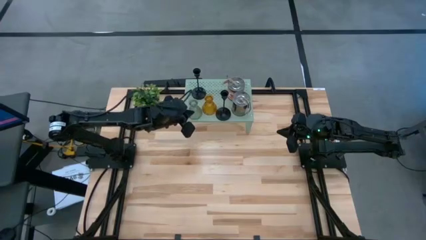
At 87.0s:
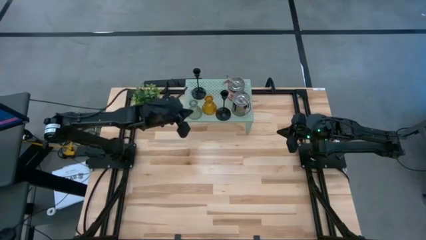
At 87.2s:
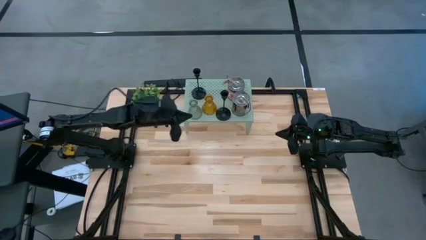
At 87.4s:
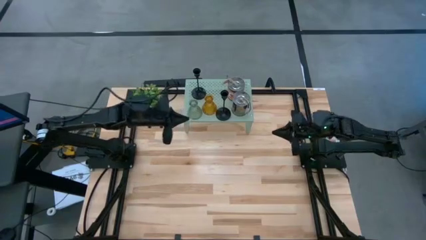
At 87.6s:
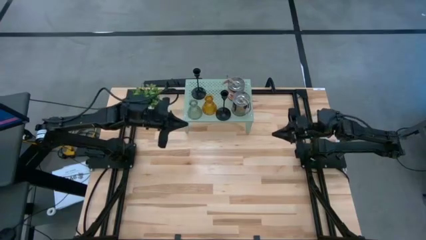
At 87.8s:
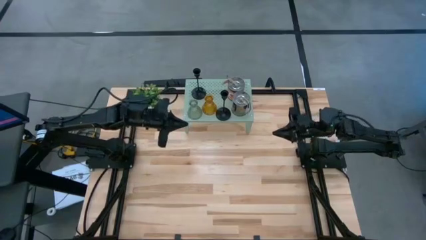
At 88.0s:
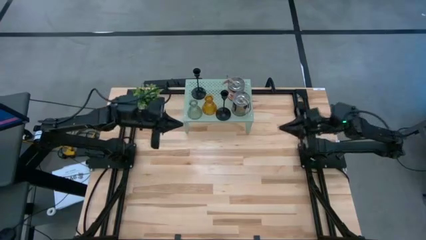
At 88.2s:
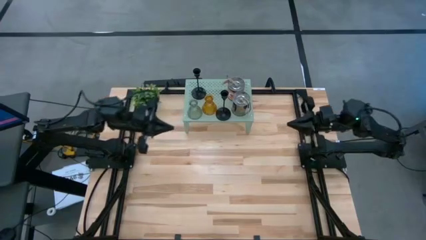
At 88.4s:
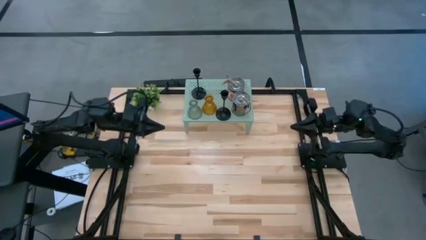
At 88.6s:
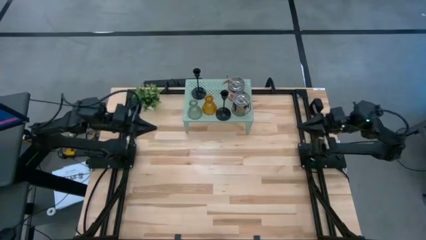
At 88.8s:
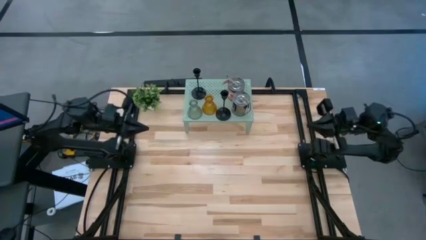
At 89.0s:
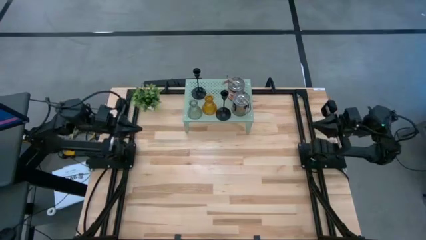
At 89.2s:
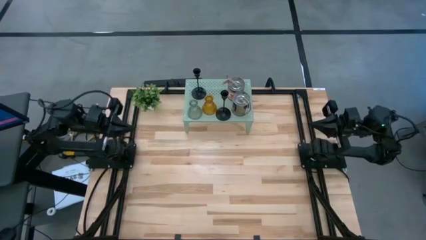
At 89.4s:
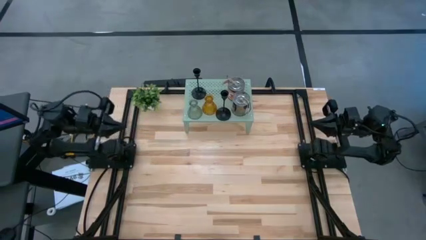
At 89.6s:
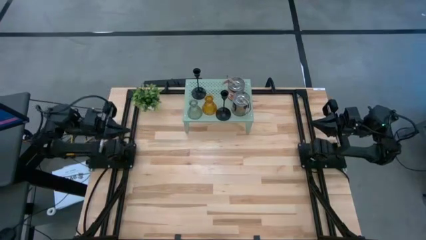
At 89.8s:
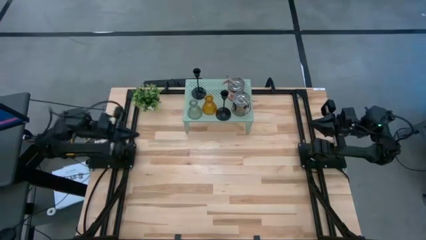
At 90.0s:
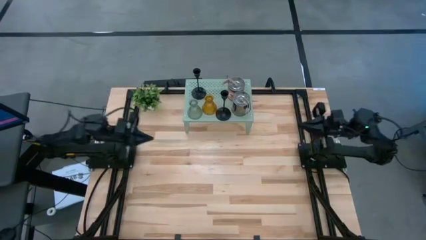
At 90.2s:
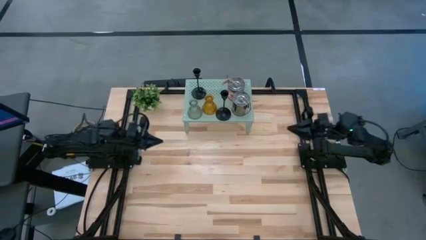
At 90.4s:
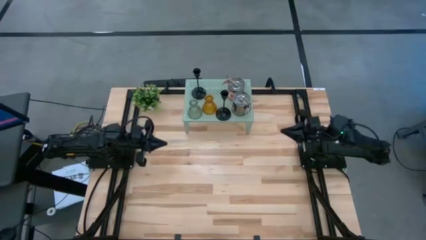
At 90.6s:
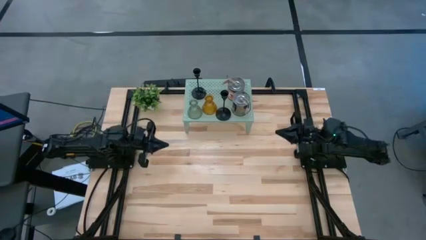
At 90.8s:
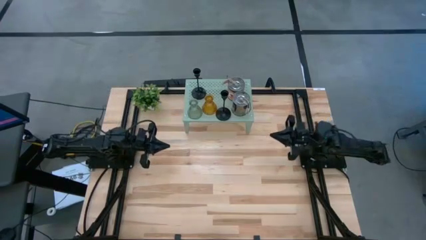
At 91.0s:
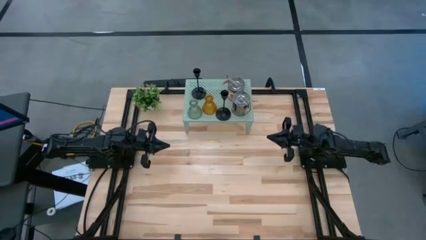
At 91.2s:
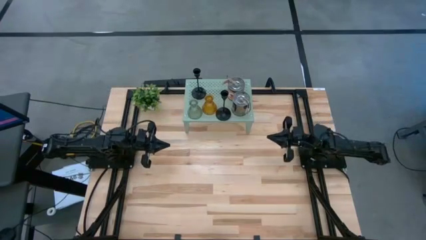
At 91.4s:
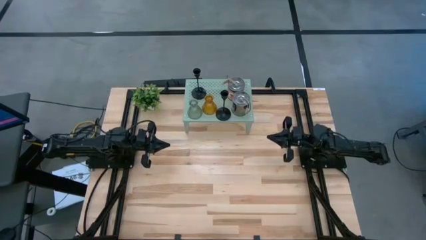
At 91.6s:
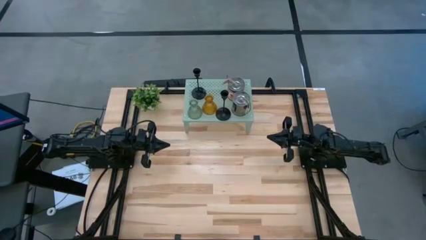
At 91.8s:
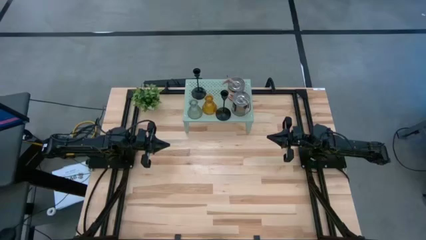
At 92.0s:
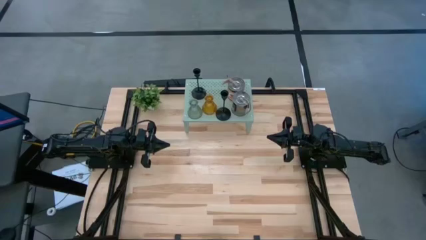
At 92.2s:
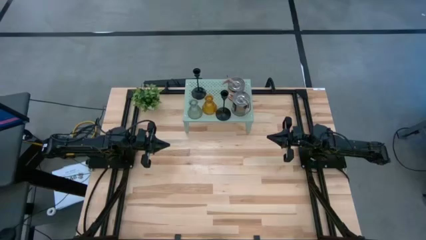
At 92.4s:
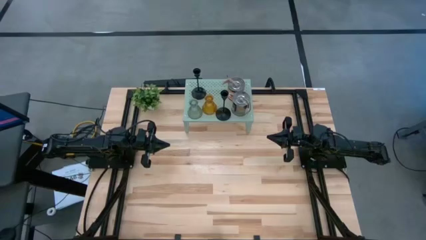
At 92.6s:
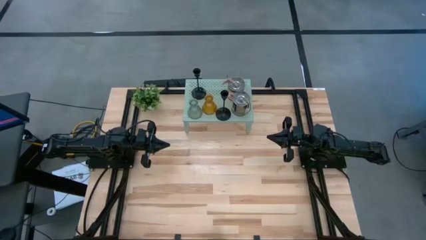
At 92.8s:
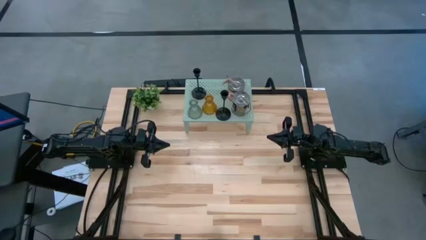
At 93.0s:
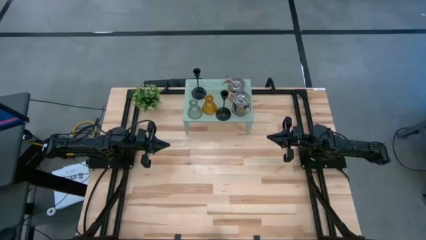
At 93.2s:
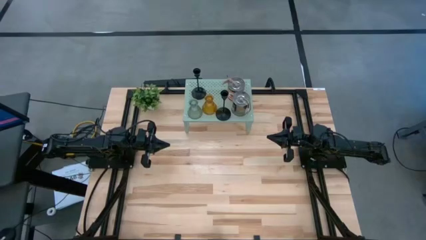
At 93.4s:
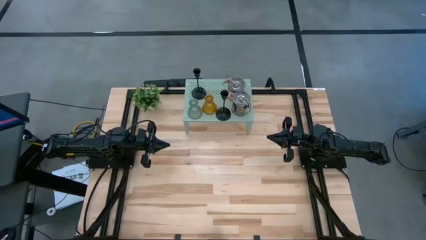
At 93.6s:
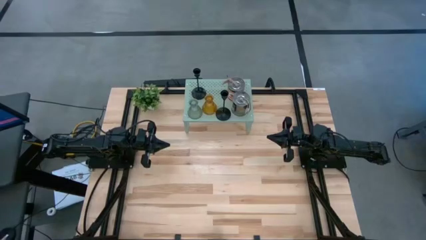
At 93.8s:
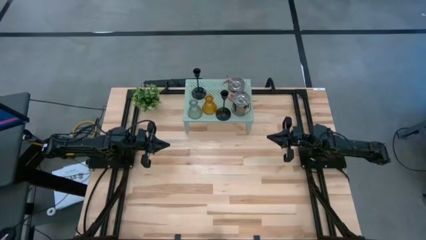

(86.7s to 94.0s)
Task: Pick & Place candle stick holders
Return to Home Position
